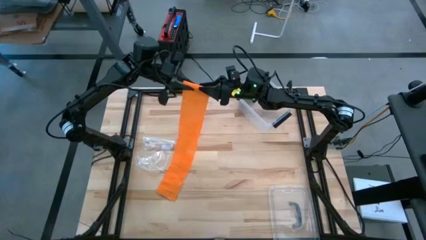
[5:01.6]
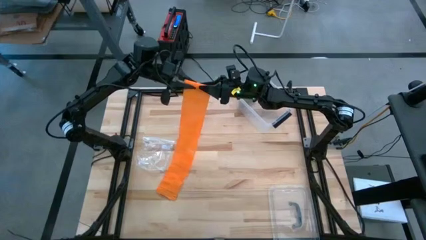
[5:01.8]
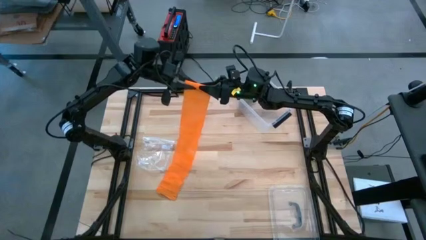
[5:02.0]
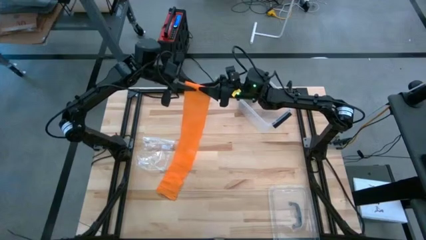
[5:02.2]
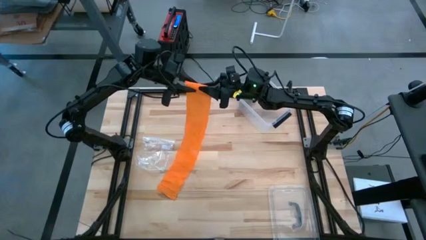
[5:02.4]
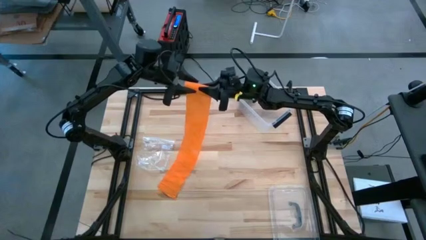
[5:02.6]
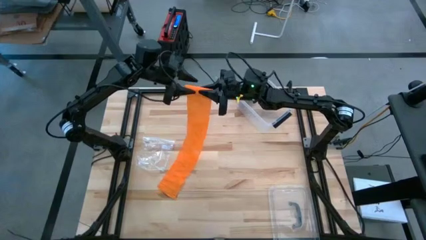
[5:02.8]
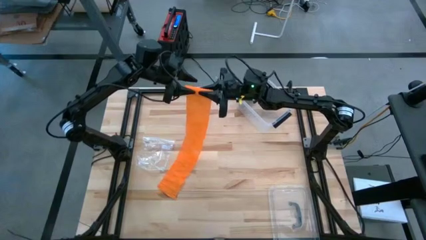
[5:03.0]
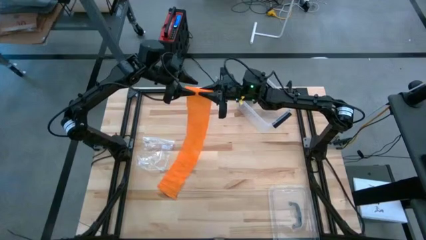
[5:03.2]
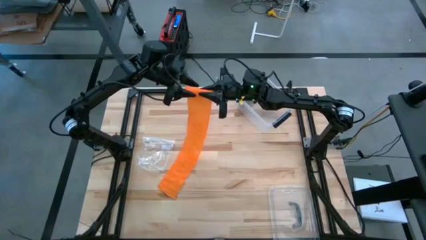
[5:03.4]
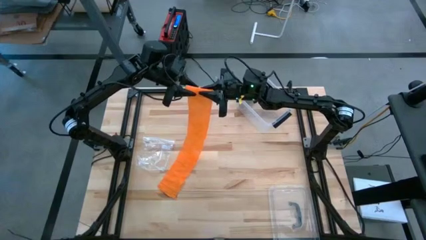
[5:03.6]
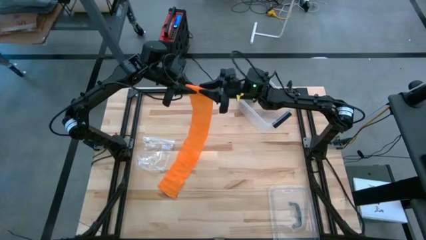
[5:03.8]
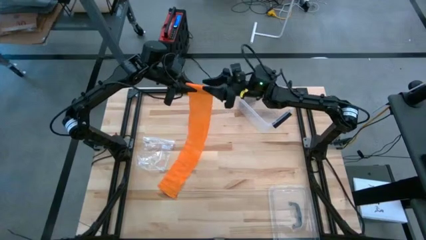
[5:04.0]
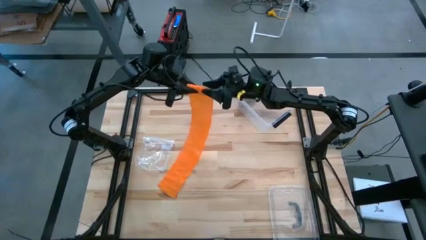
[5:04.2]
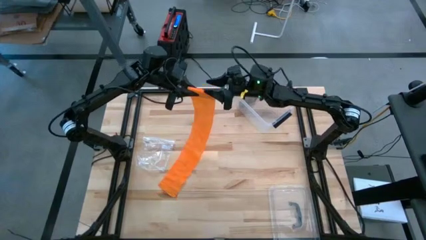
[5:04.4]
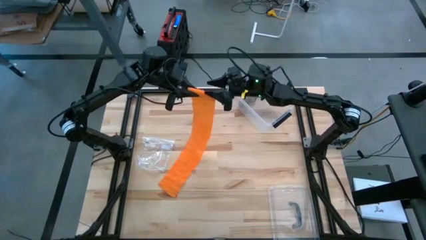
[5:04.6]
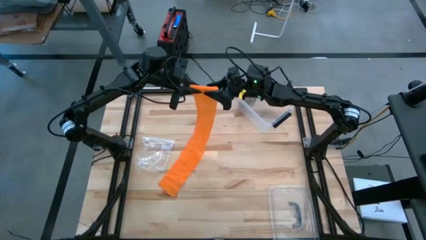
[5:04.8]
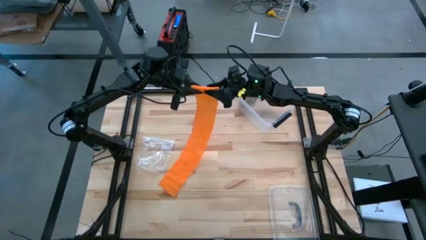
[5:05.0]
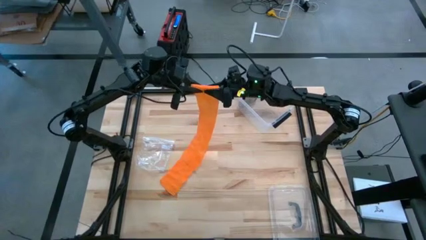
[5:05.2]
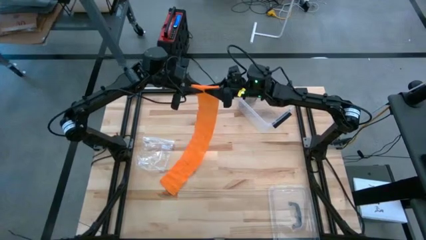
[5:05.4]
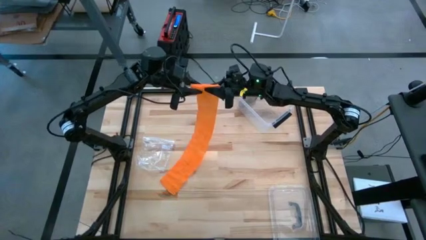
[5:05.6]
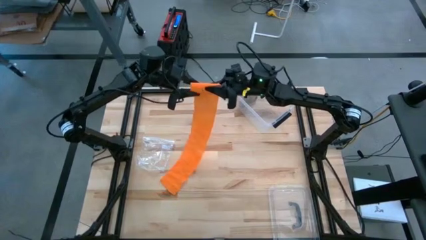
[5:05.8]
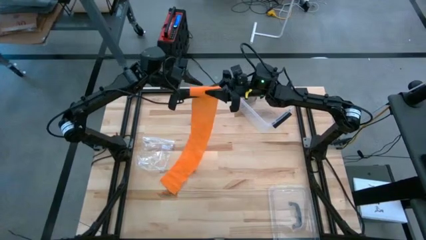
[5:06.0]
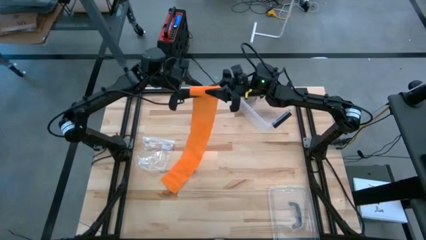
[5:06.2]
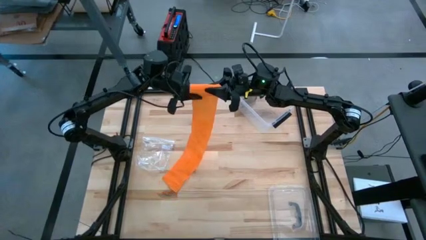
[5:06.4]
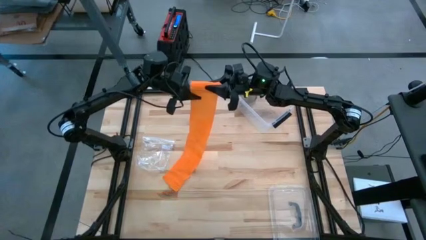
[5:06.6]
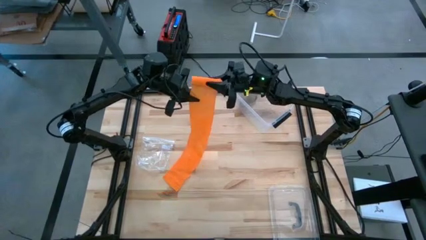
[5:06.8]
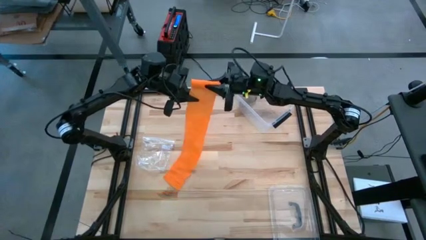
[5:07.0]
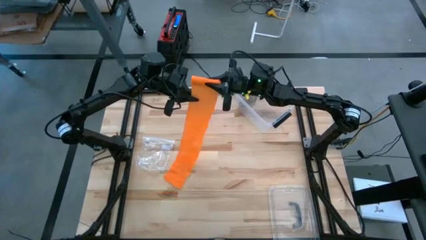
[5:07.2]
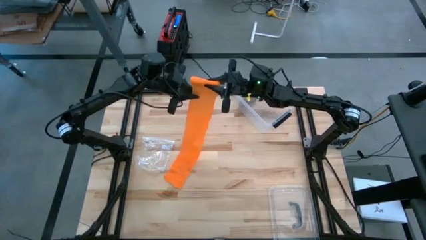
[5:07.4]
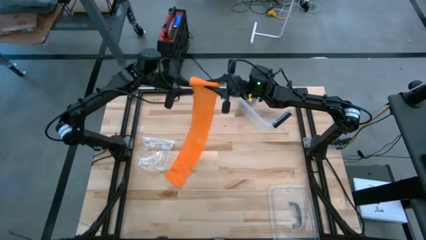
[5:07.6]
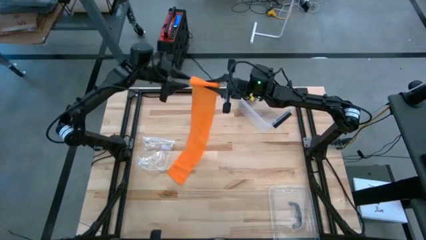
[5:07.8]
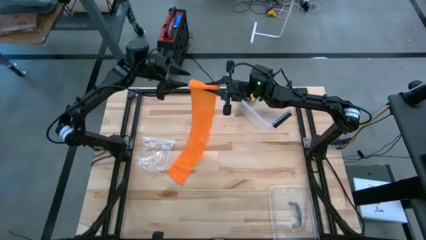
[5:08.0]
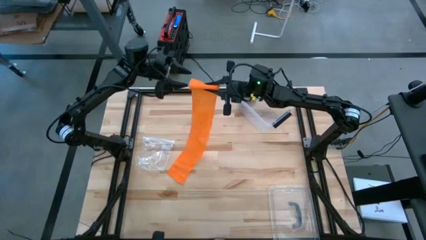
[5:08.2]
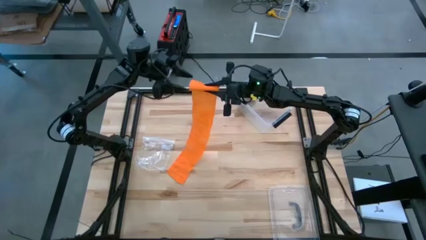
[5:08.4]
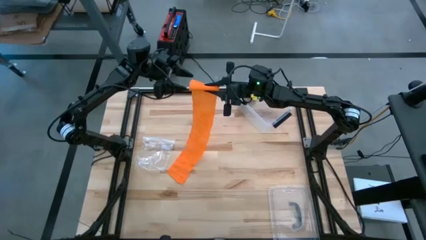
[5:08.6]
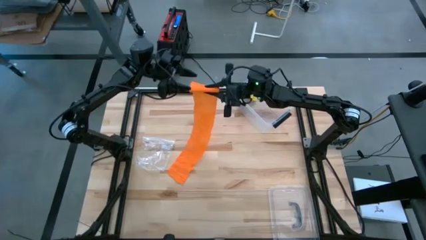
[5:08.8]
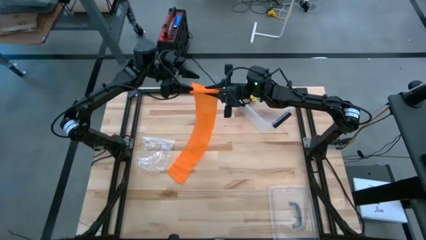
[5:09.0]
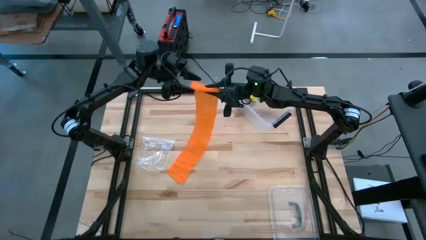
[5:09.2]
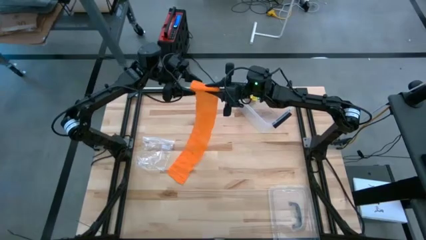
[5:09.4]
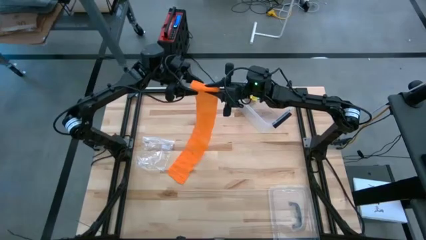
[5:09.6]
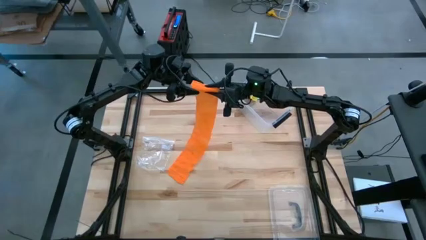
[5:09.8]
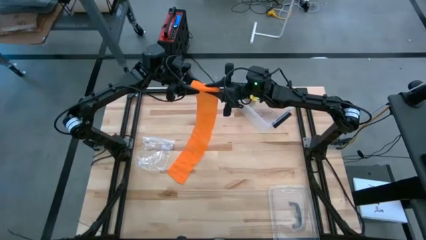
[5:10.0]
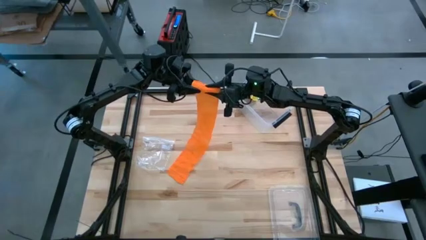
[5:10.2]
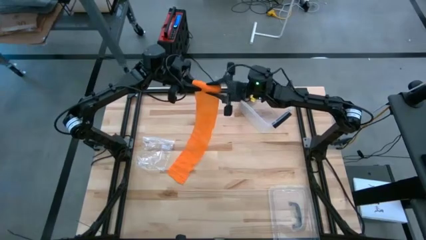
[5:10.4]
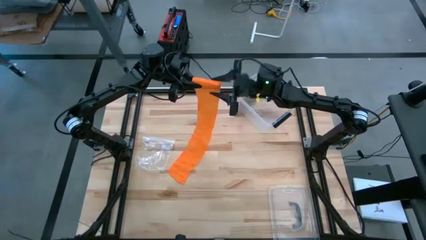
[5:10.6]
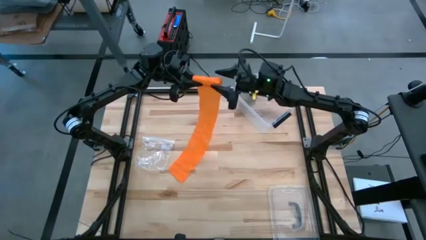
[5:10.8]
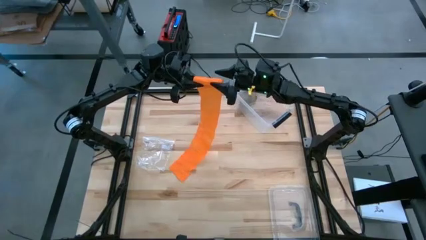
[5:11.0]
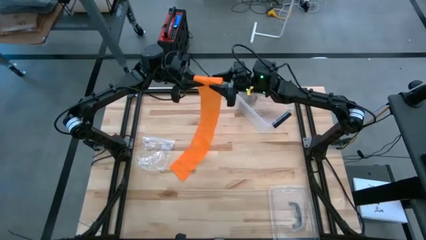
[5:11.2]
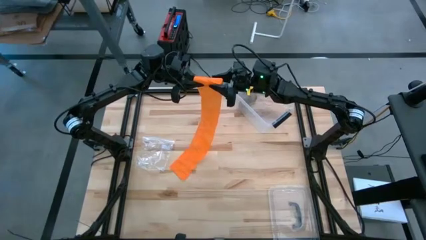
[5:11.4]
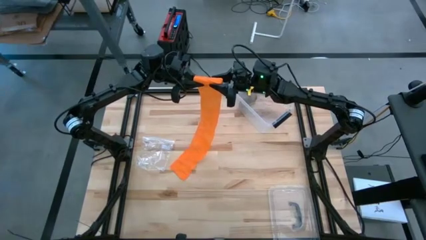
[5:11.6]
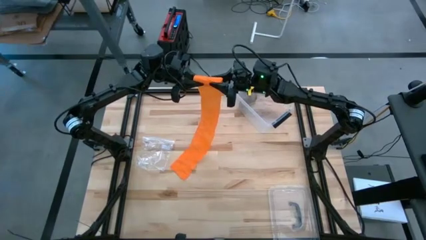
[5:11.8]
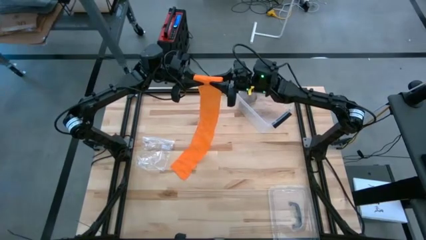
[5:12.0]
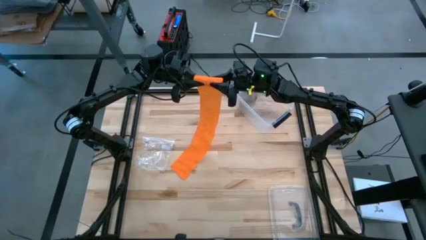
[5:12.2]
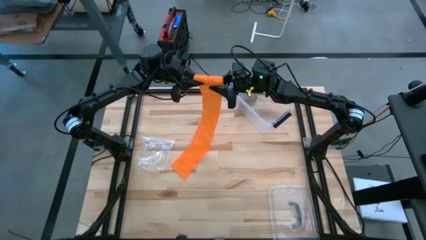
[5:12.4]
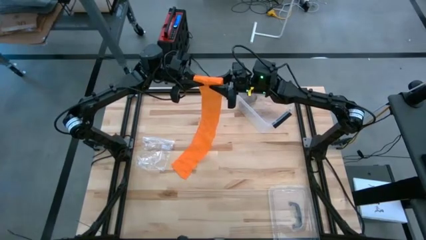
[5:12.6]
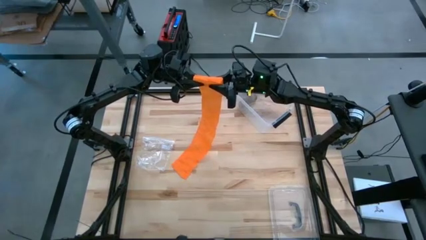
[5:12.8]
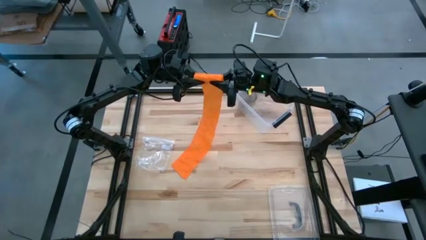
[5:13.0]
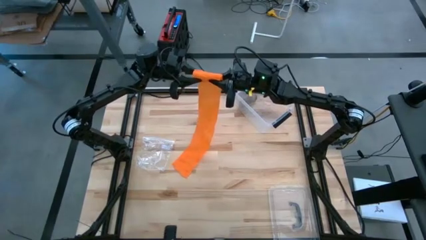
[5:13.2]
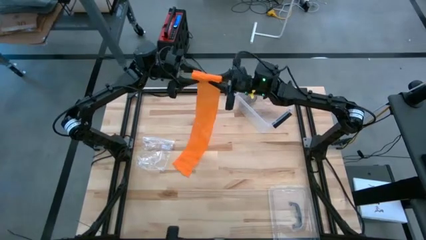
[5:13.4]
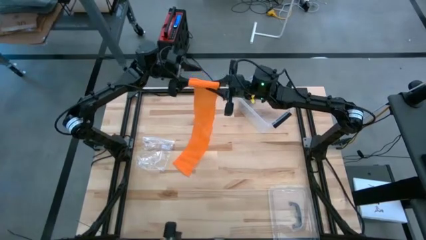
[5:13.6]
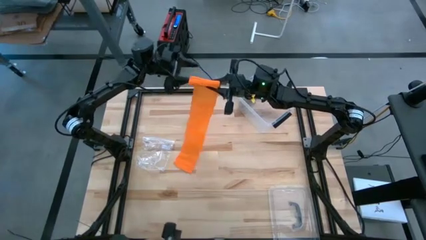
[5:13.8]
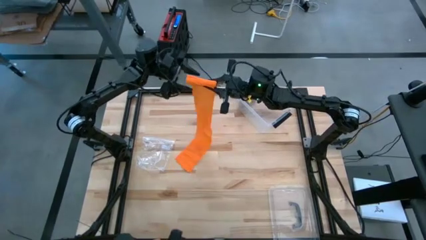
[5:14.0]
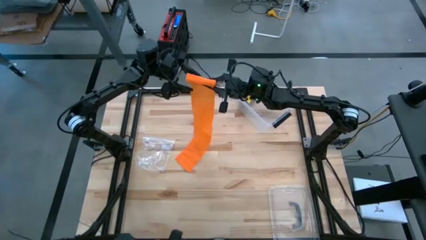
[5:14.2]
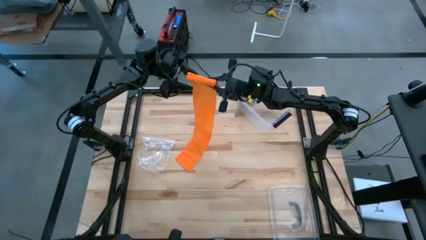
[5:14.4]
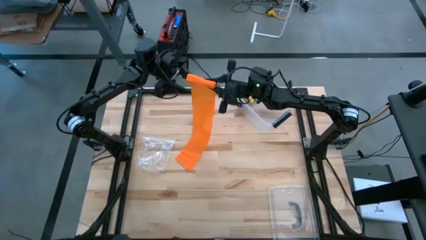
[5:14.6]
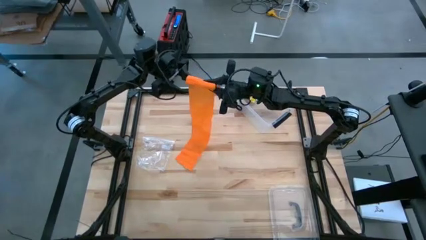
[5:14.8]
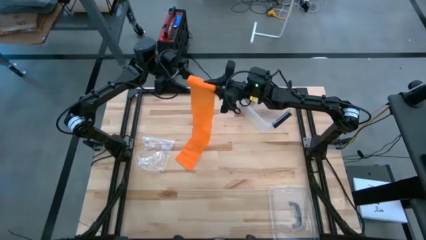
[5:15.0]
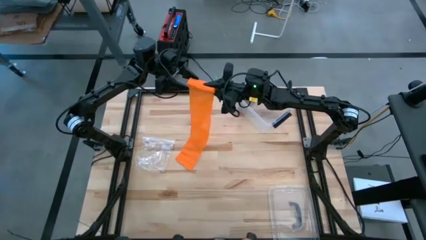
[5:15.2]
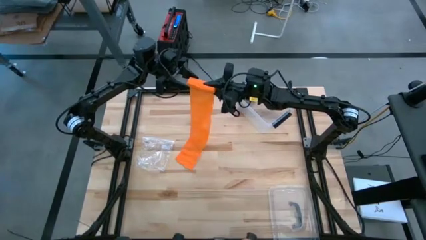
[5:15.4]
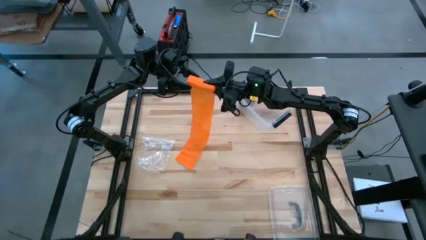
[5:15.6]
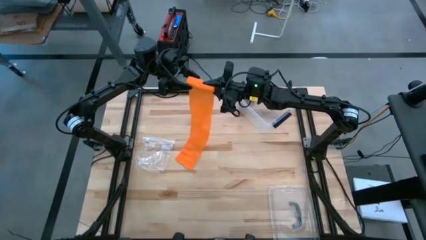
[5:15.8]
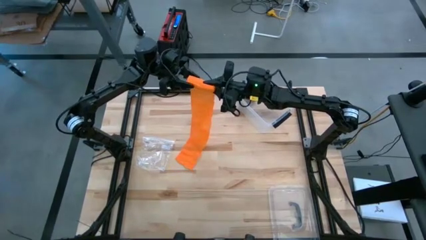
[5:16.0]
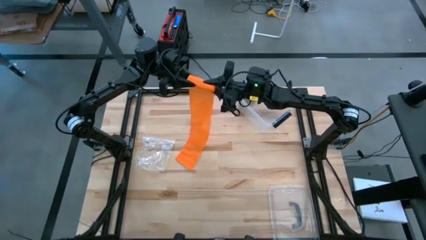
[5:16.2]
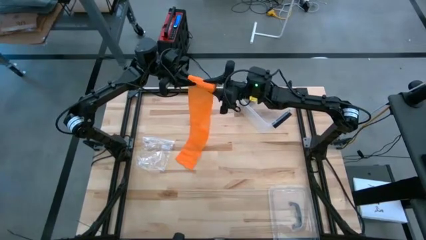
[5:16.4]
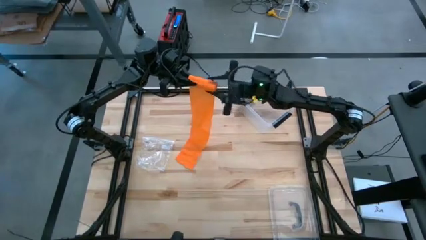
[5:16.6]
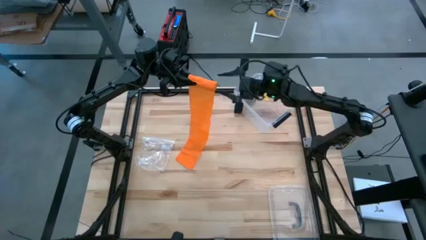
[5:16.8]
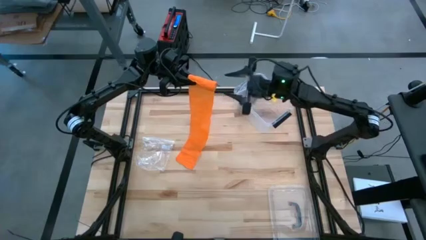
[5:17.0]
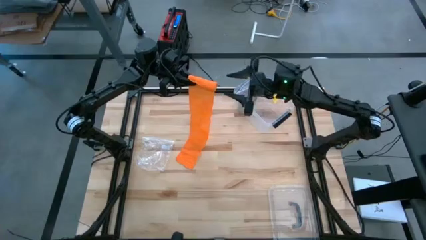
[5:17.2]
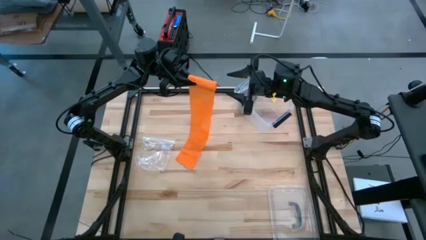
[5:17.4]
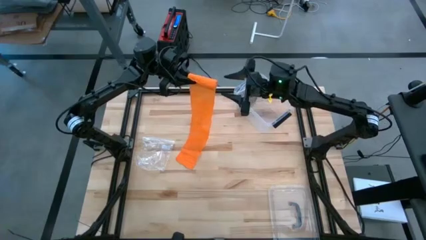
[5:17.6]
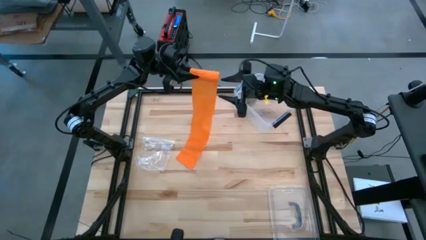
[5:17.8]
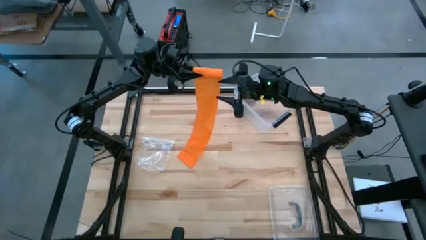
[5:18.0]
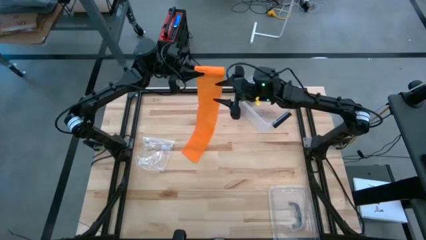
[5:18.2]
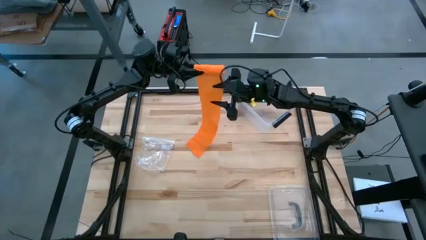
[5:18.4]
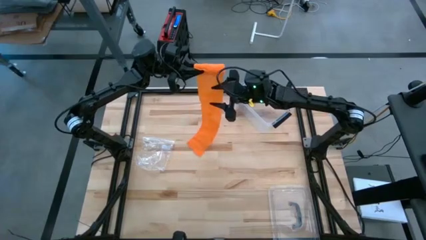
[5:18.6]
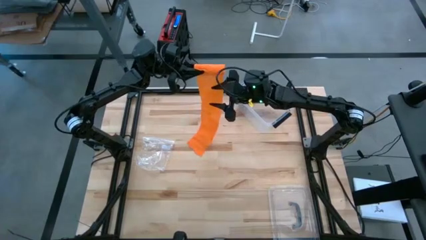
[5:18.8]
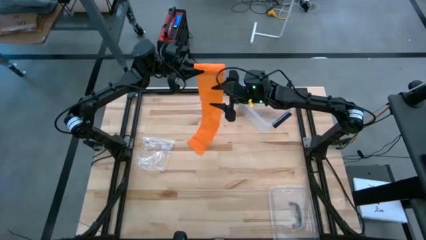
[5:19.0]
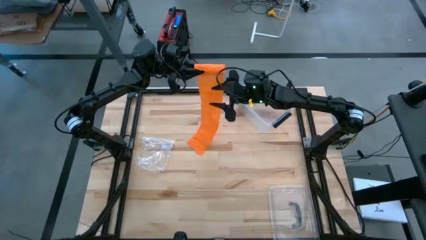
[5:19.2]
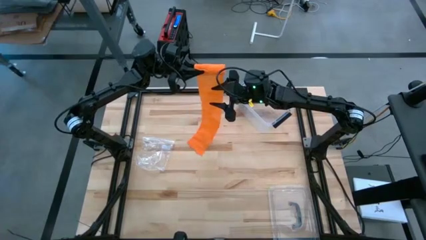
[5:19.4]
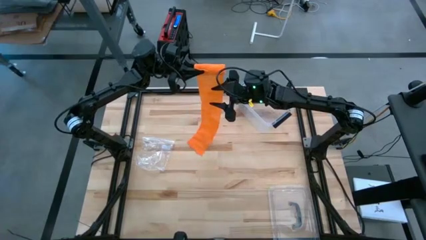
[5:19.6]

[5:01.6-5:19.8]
Task: Roll bandage
Roll the orange bandage on the table
